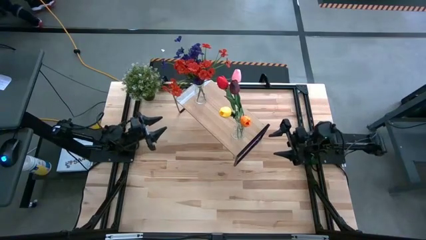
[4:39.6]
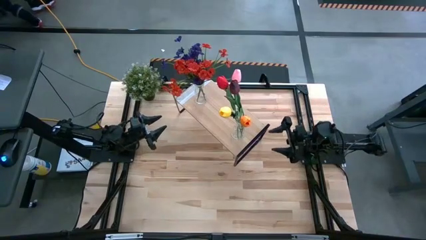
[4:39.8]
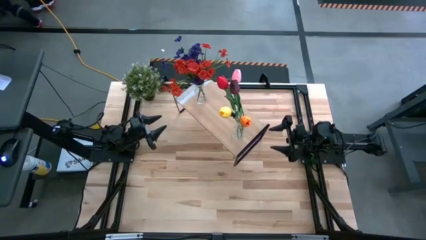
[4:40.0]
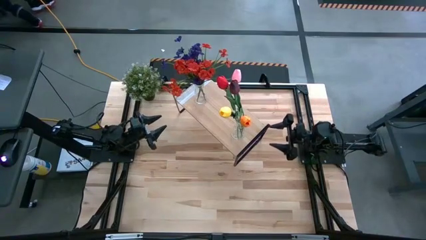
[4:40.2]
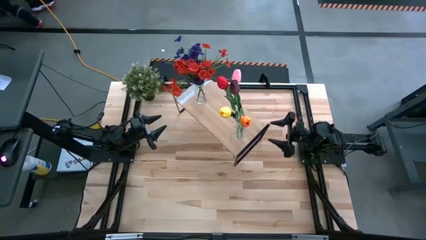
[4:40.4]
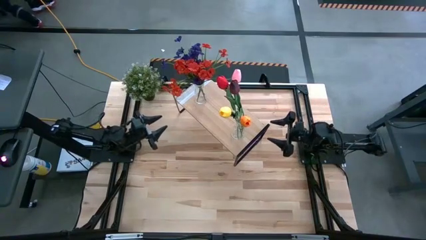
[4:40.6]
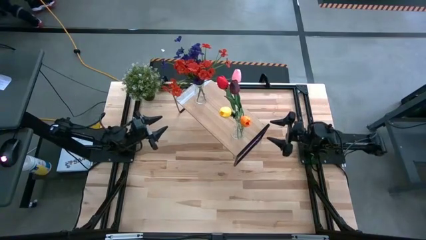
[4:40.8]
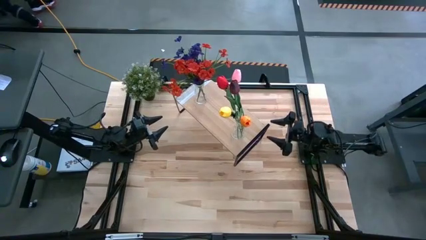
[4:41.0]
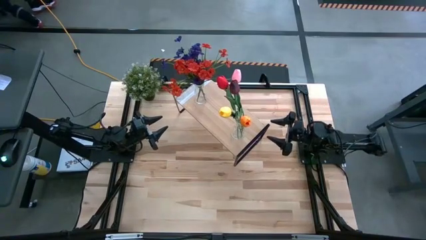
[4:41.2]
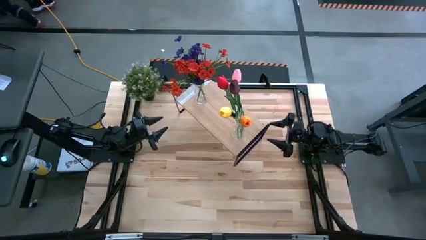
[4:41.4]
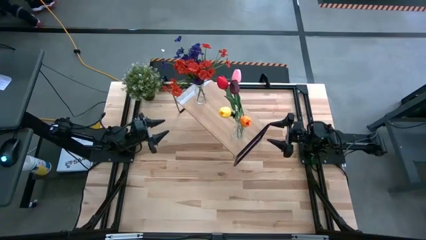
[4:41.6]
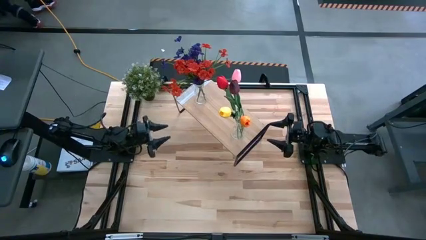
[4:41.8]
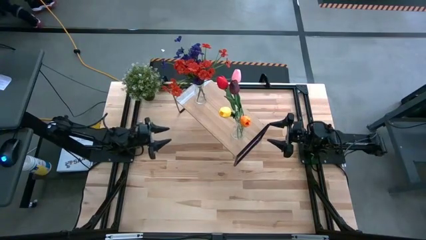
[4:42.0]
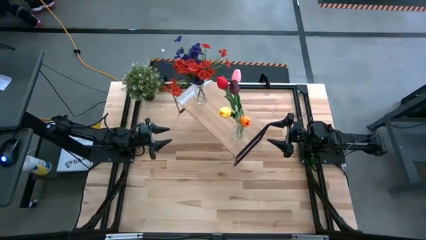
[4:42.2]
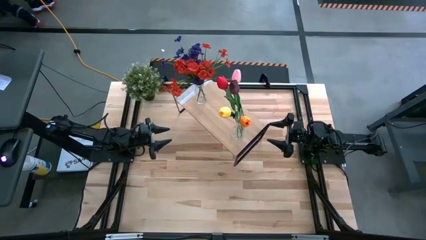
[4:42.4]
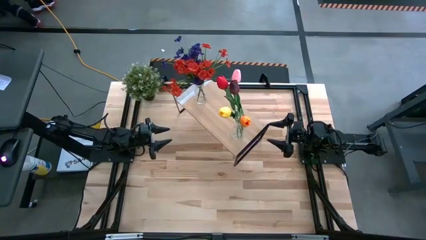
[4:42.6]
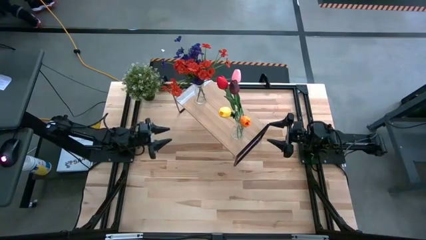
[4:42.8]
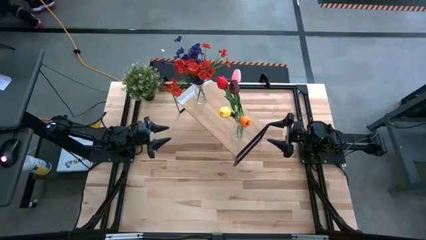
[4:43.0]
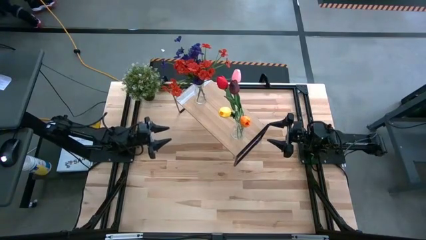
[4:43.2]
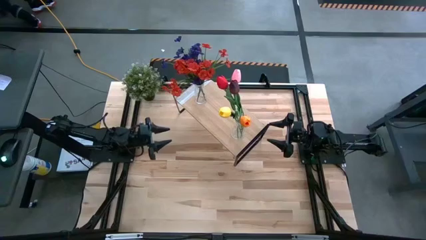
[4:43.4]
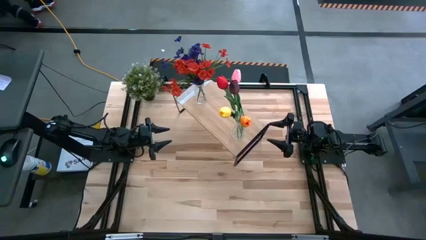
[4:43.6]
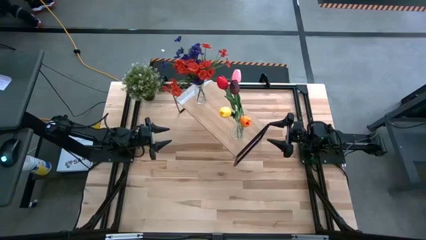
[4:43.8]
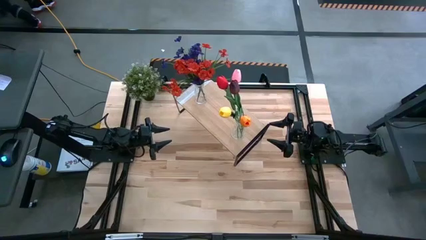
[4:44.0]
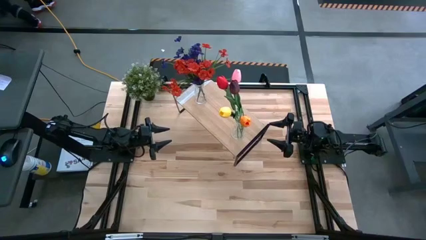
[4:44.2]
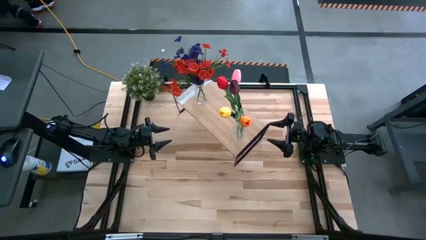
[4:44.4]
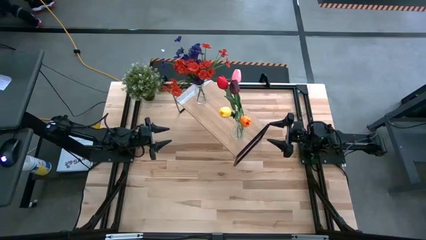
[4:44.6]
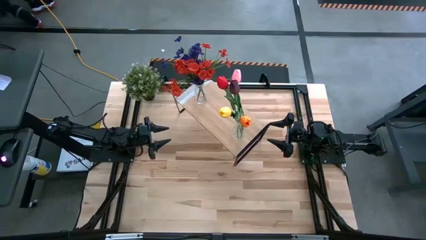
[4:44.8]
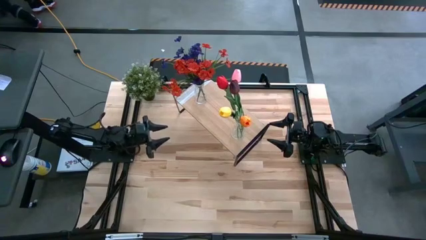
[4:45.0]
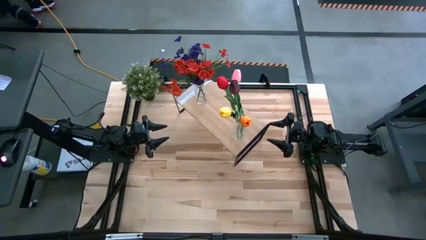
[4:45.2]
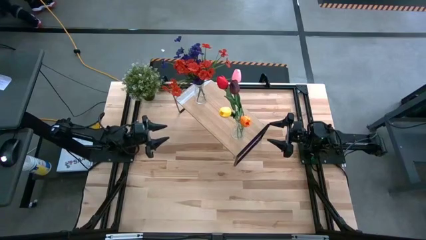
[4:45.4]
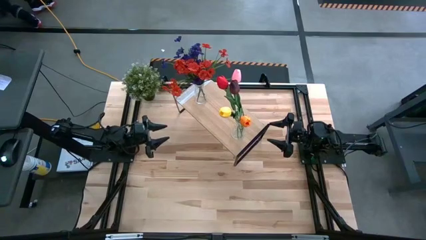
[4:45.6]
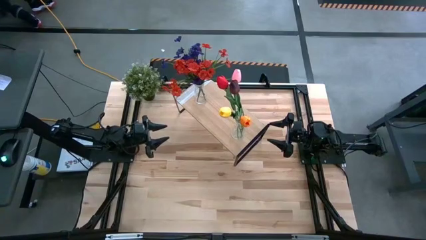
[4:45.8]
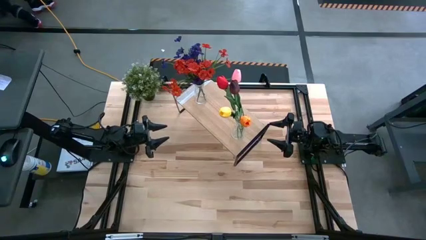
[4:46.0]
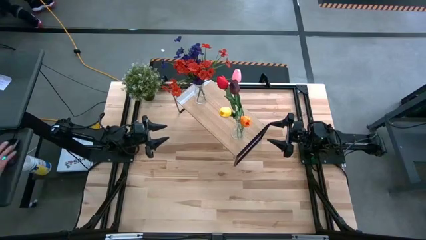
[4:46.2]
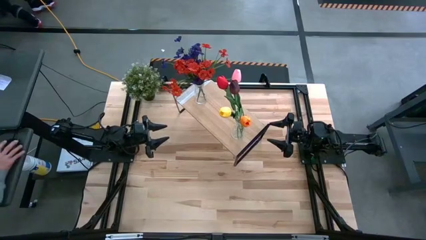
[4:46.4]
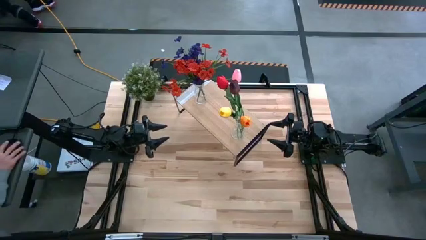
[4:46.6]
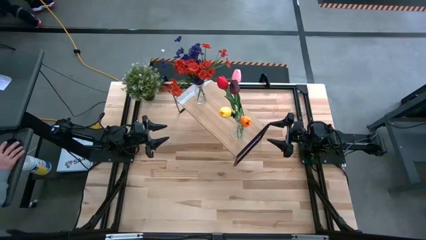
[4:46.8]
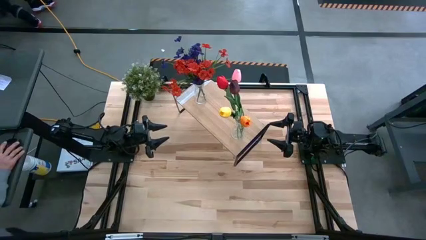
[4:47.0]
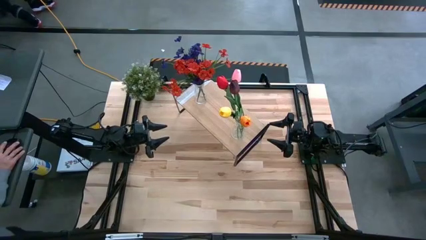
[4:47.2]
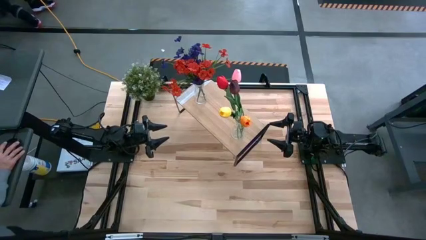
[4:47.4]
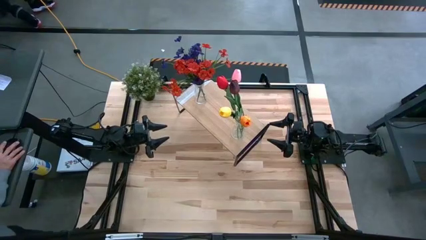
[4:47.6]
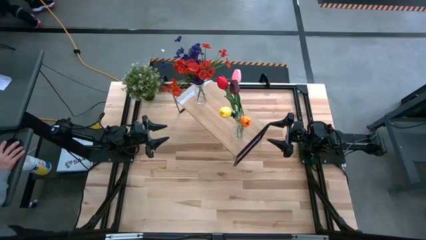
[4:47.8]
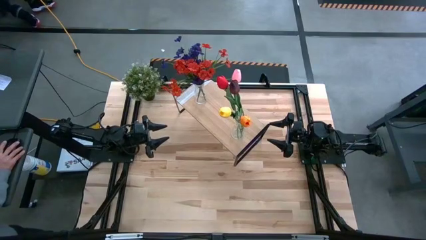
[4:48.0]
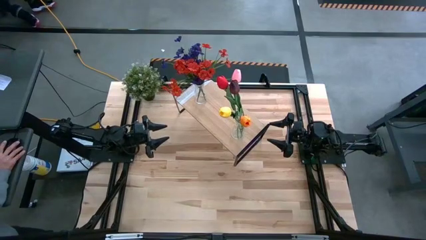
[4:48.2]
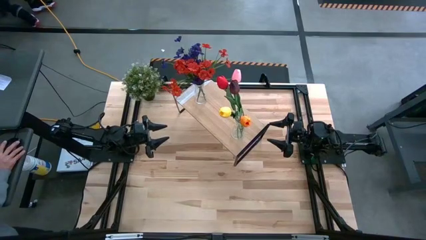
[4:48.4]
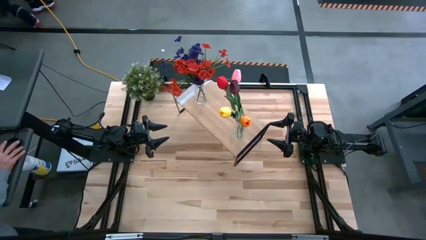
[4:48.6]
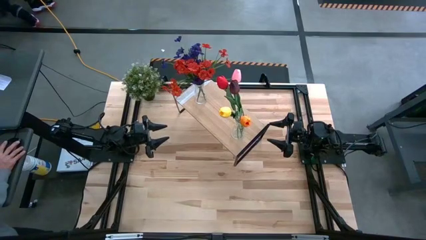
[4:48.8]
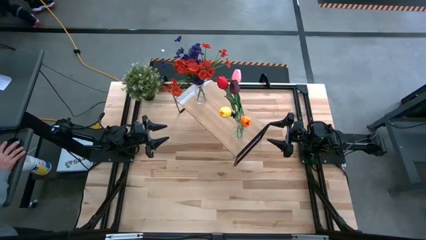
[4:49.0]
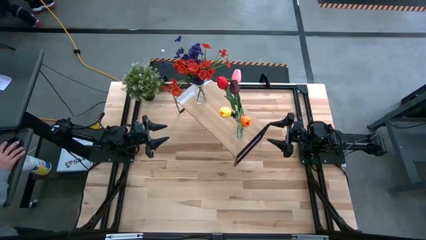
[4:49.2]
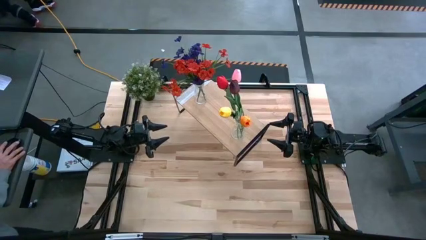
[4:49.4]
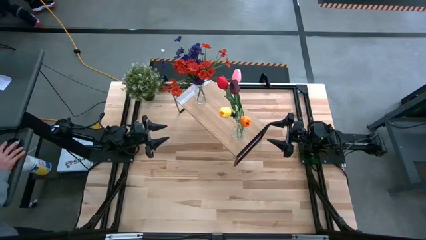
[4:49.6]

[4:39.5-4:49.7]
Task: Pick and place flowers into a vace then onto a shelf
Return to Home Position

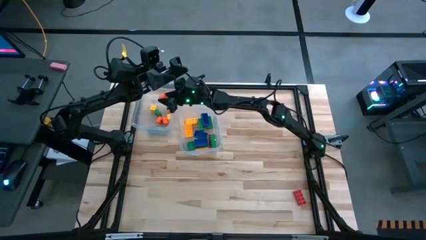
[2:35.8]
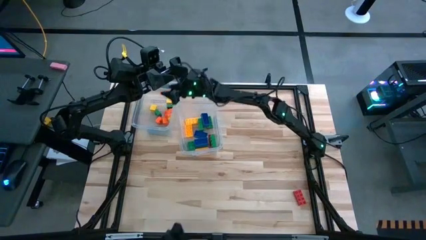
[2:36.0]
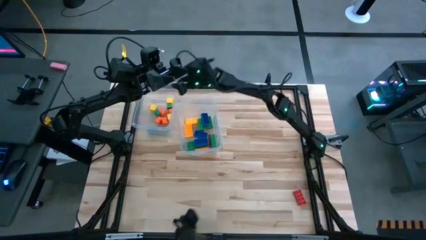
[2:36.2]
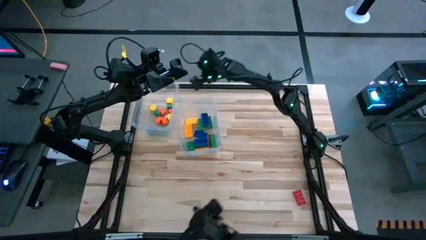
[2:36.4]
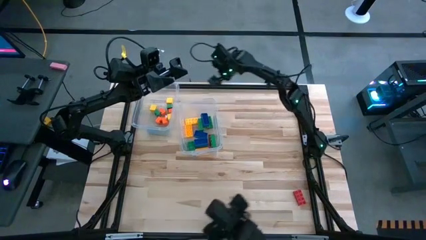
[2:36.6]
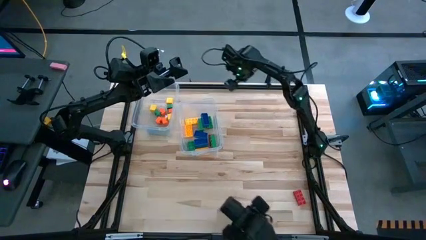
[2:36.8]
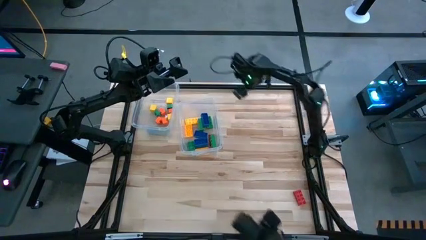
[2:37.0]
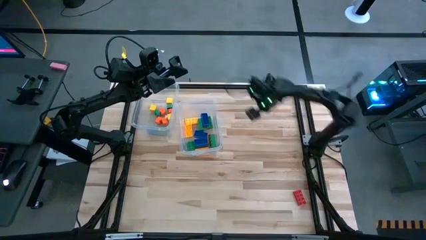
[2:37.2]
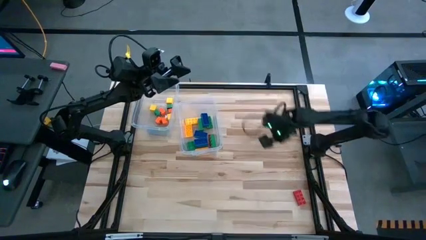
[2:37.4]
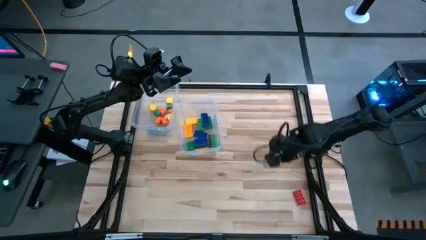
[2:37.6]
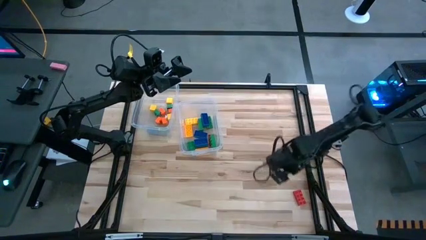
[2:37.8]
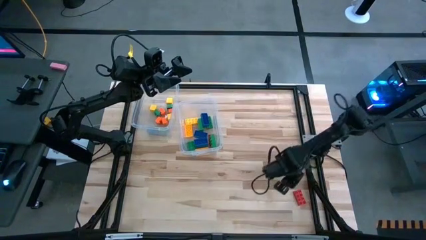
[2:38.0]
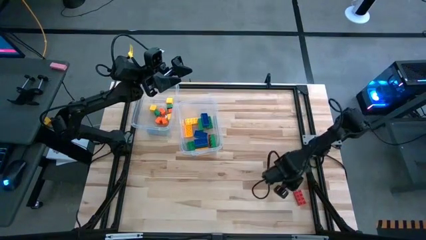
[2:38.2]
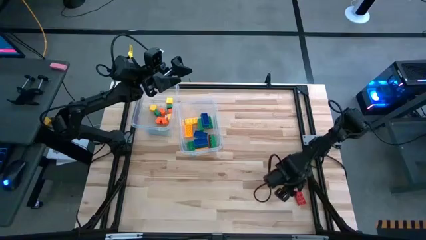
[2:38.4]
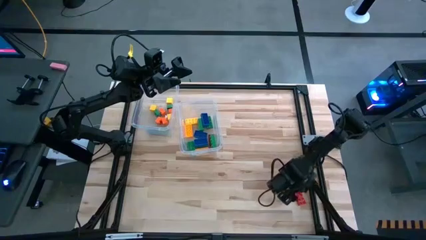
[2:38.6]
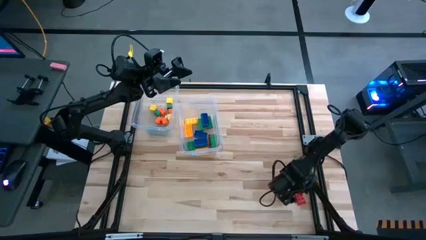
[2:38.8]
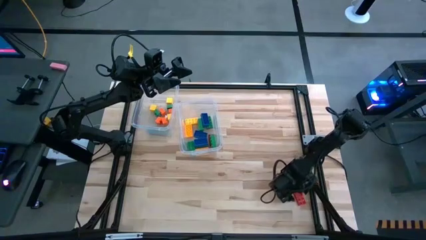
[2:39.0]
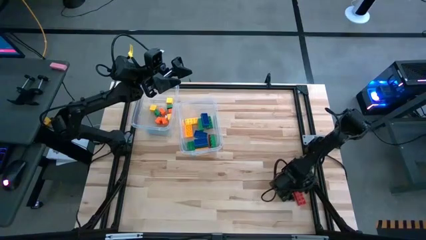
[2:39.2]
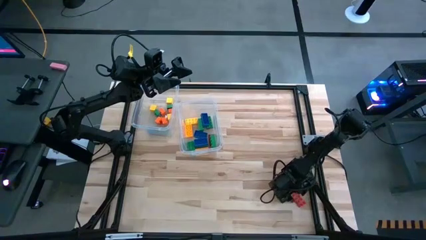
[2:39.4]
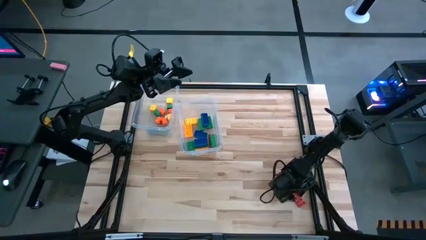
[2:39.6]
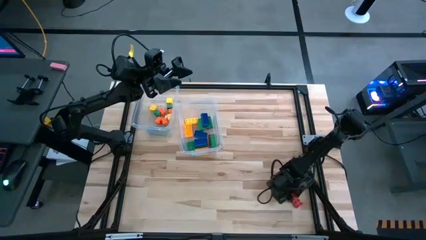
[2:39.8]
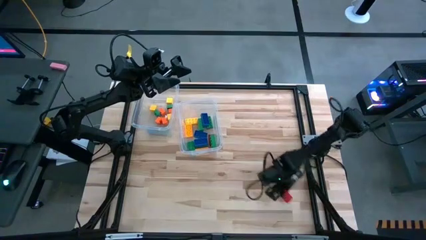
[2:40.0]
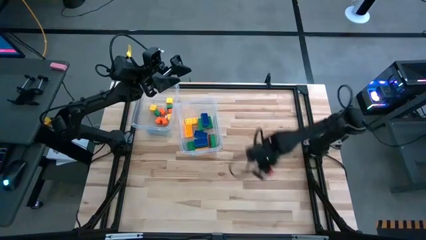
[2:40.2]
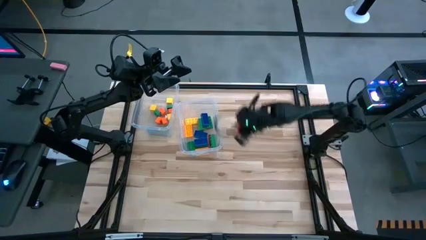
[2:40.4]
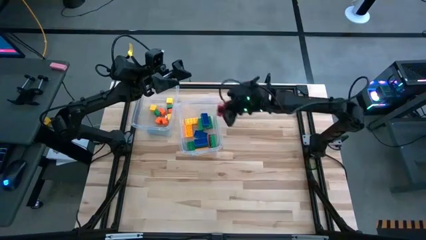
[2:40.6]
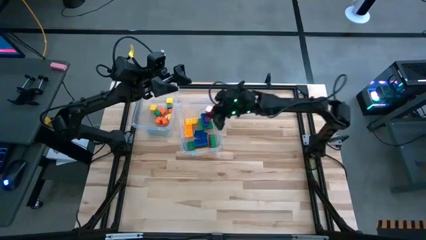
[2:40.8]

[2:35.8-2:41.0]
Task: Sort blocks by size
Put the red big game piece into the right transparent bin
